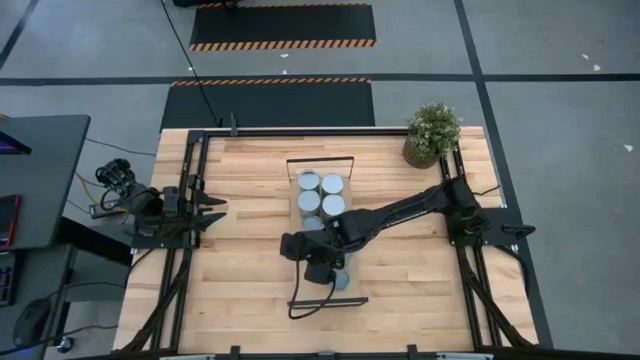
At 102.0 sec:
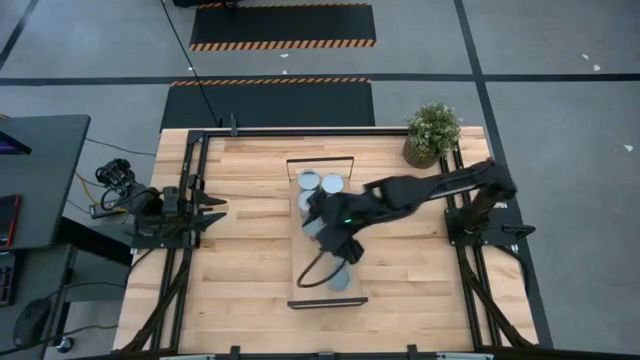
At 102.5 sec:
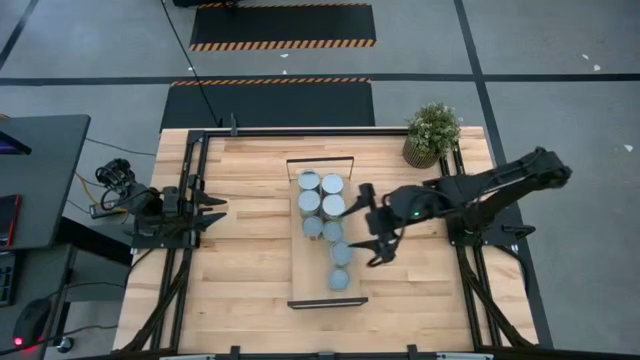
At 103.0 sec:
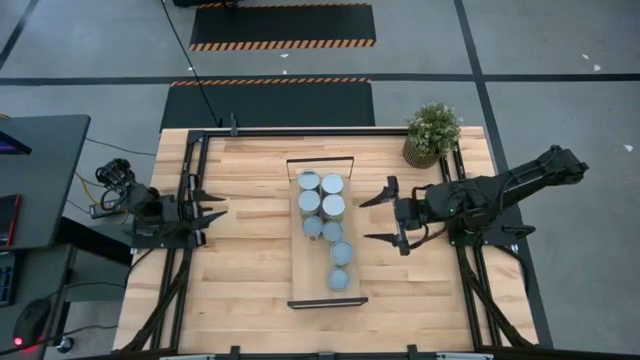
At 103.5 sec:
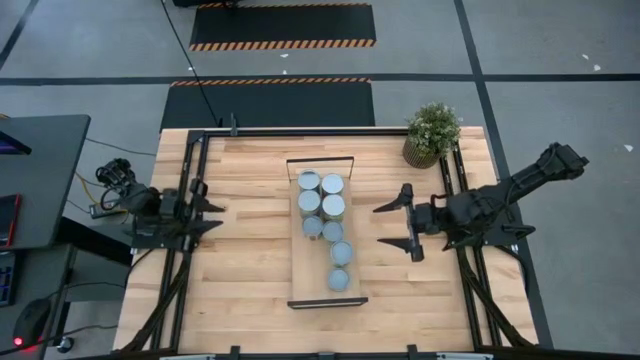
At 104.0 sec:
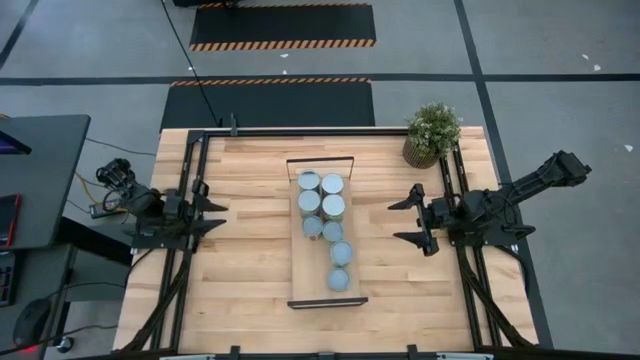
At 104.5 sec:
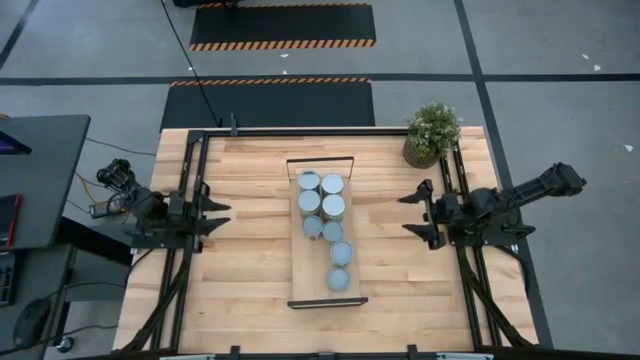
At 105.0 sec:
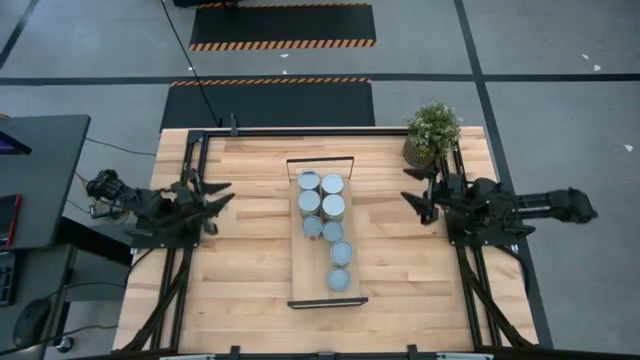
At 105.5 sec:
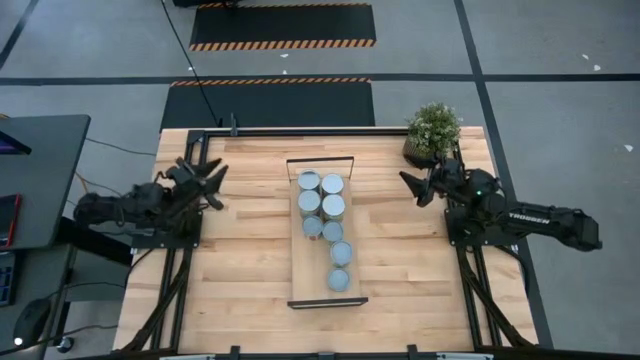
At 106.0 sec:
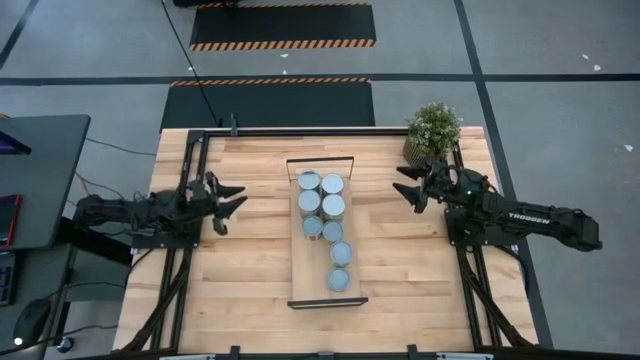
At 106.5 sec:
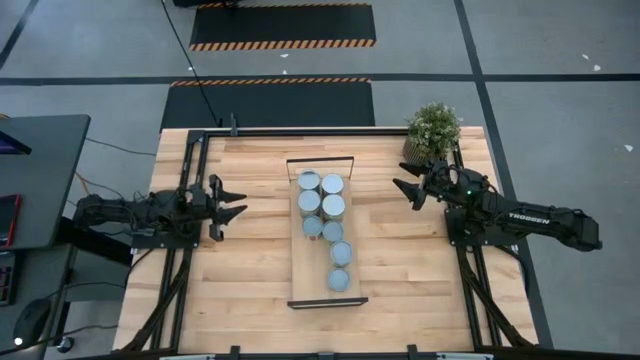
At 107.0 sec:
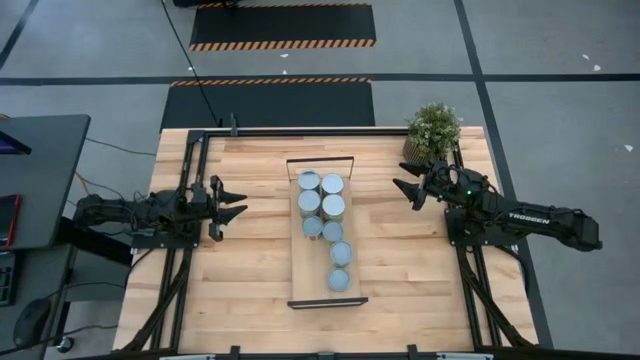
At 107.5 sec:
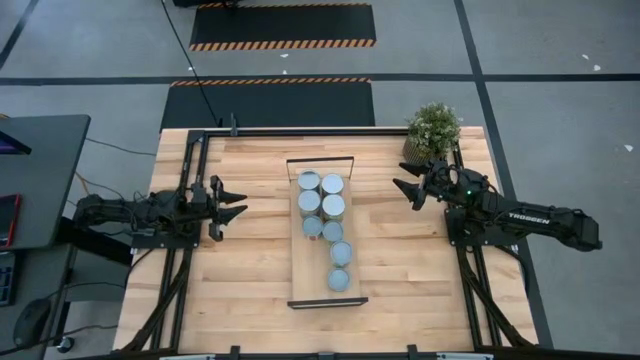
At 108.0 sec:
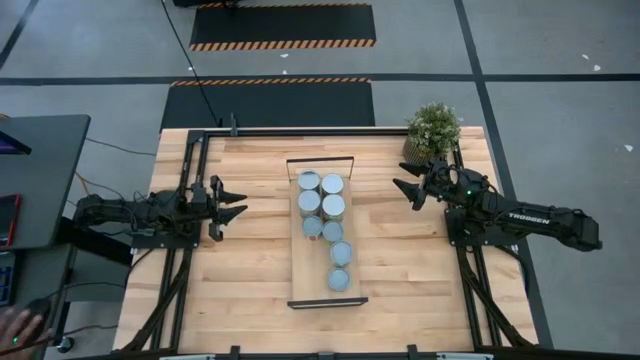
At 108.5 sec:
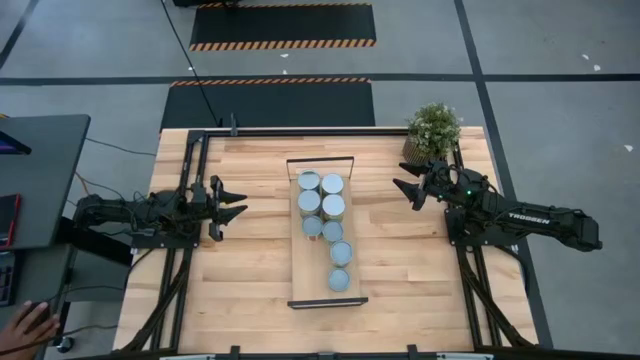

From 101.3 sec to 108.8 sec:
Task: Pick and place cans onto a shelf
Return to Home Position
